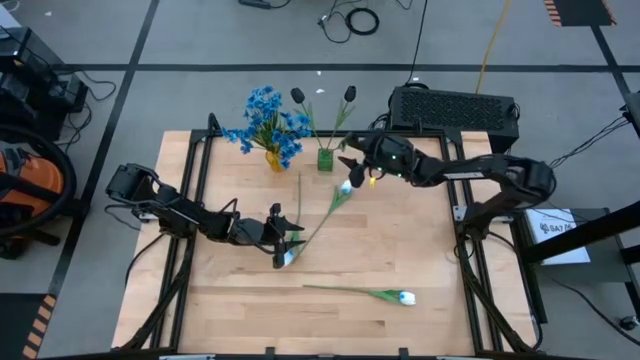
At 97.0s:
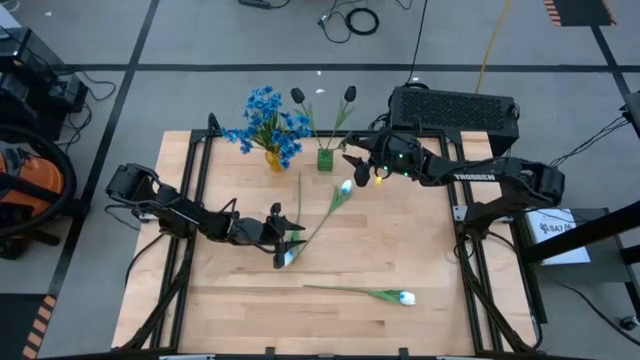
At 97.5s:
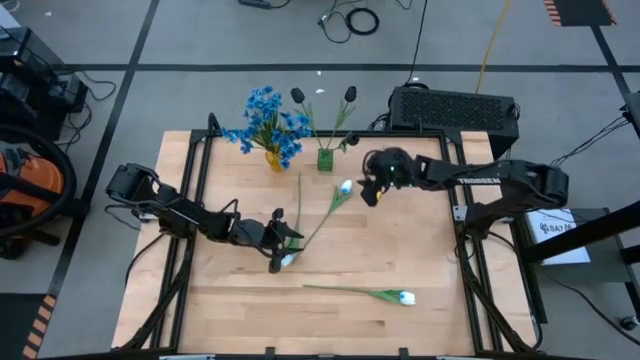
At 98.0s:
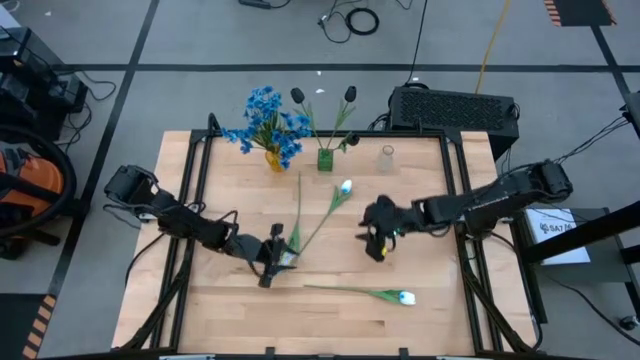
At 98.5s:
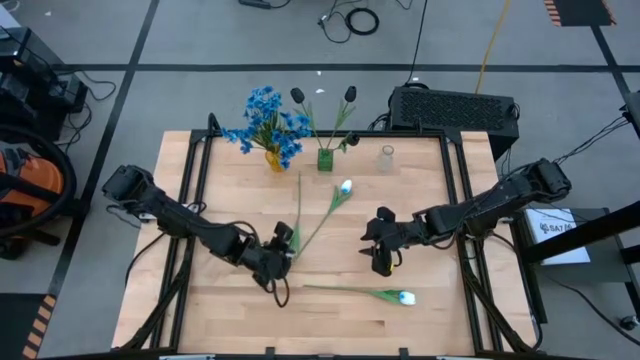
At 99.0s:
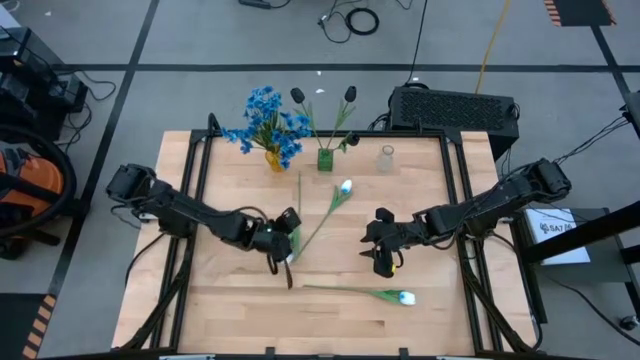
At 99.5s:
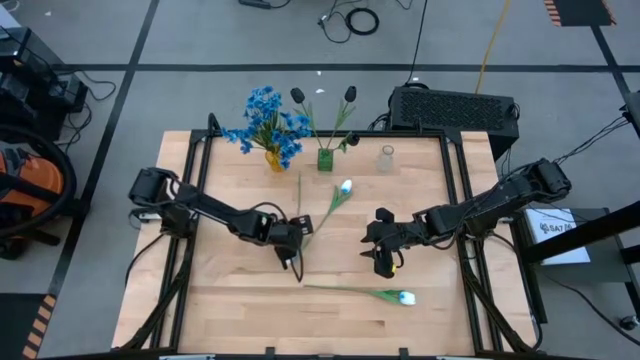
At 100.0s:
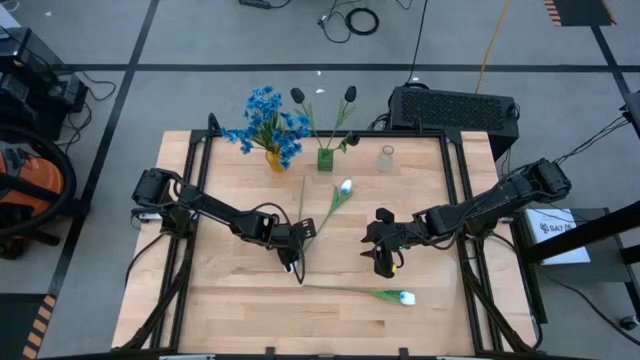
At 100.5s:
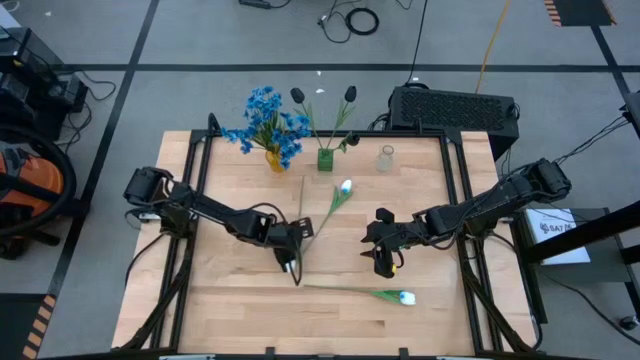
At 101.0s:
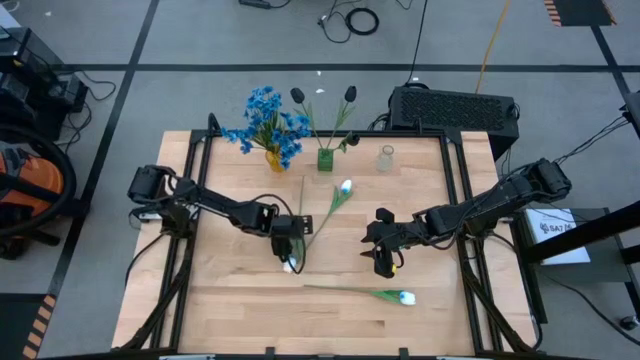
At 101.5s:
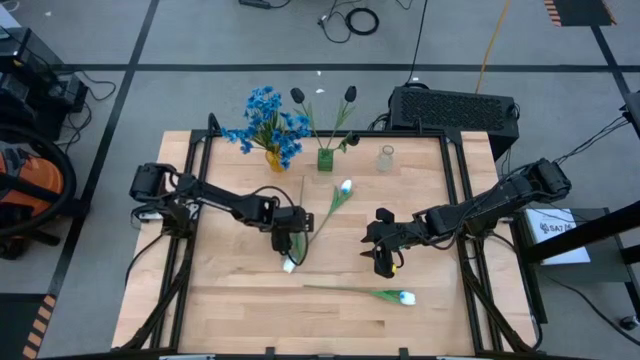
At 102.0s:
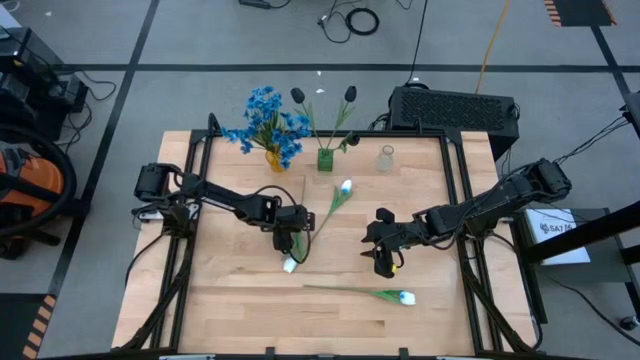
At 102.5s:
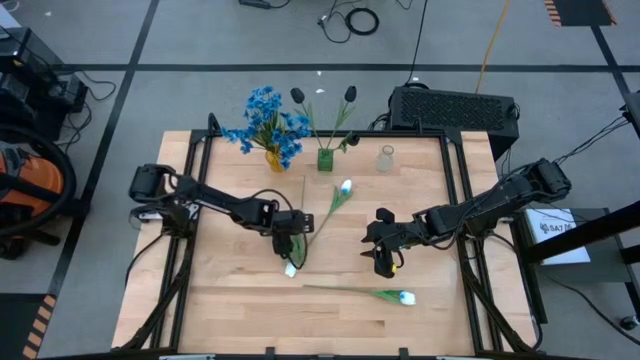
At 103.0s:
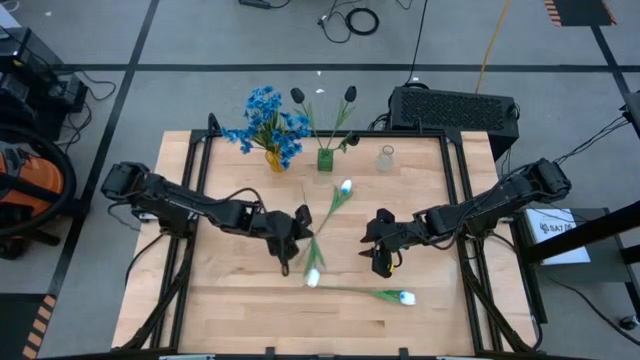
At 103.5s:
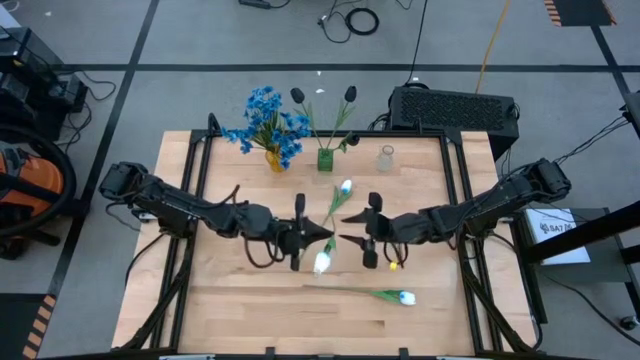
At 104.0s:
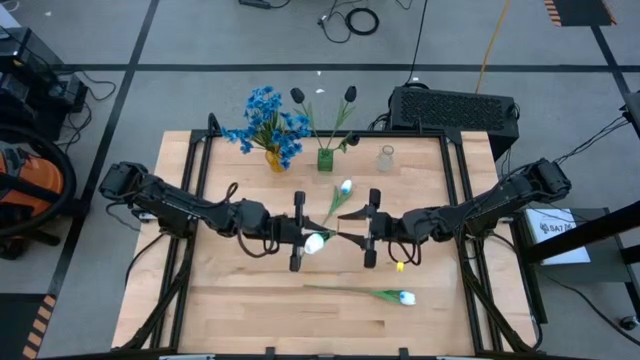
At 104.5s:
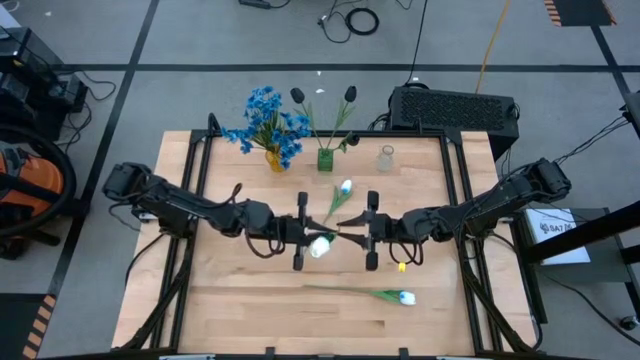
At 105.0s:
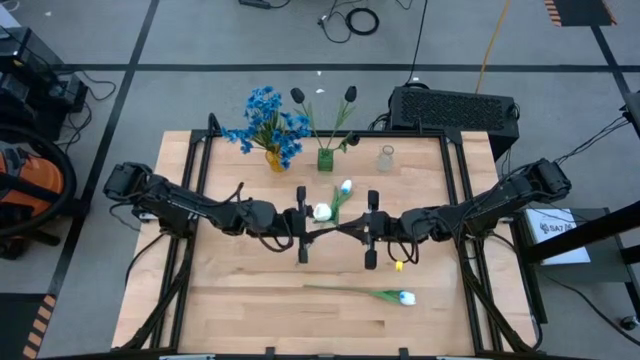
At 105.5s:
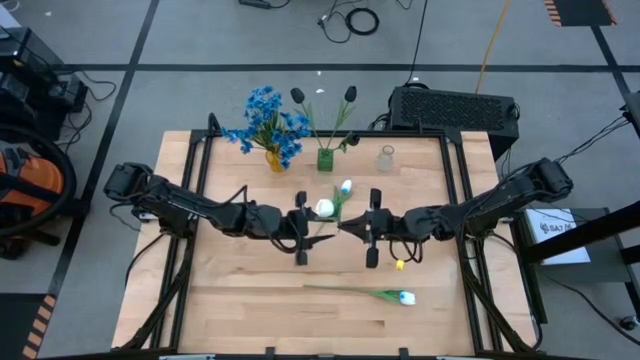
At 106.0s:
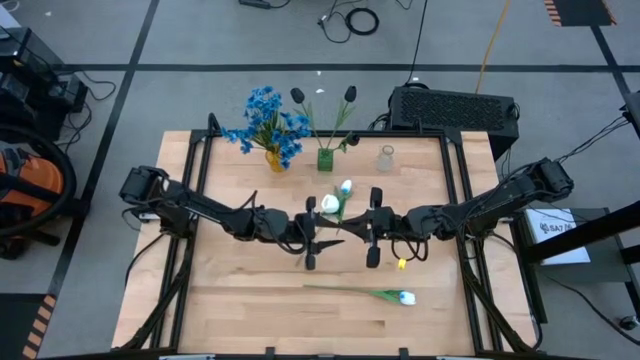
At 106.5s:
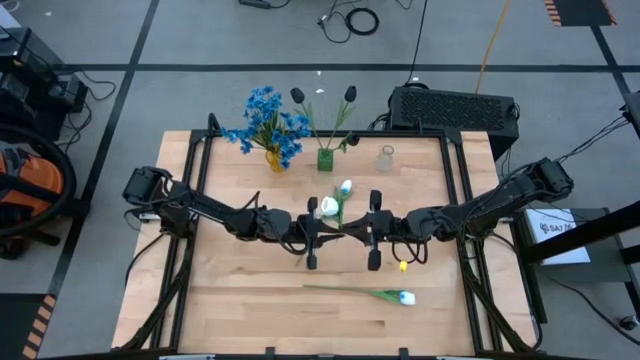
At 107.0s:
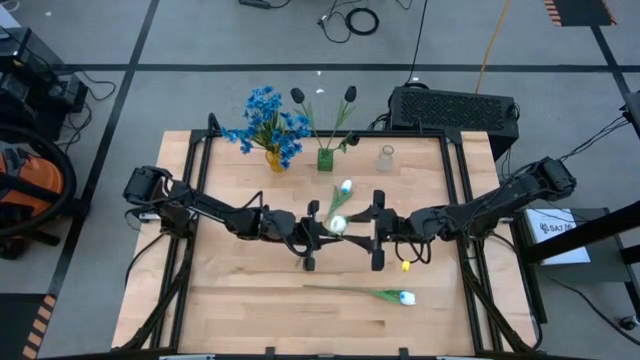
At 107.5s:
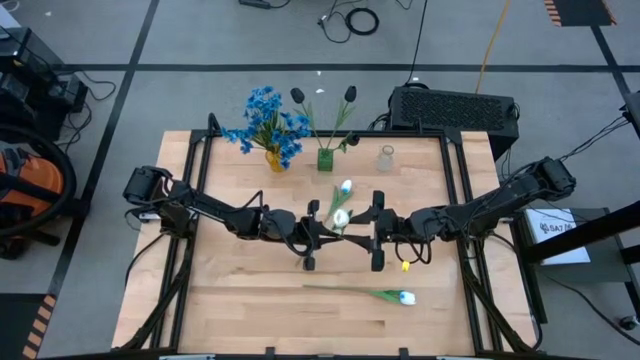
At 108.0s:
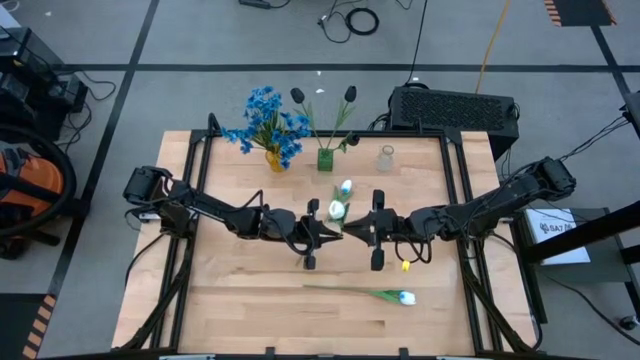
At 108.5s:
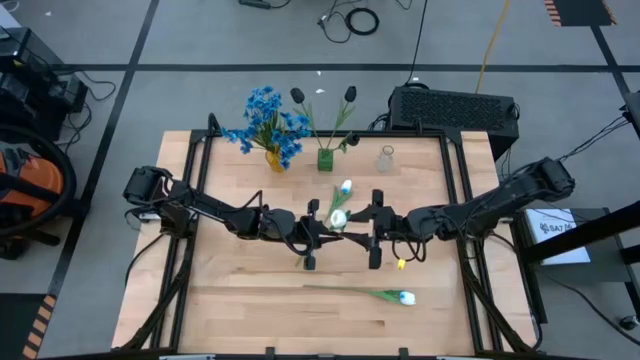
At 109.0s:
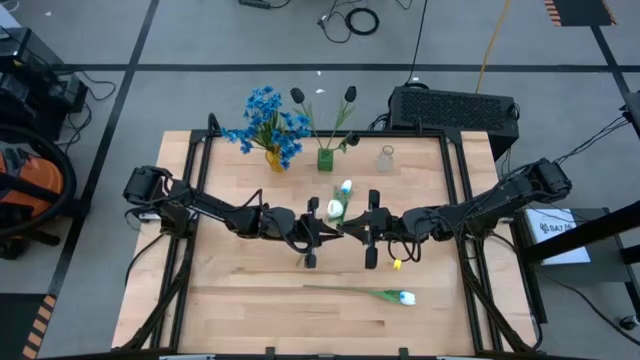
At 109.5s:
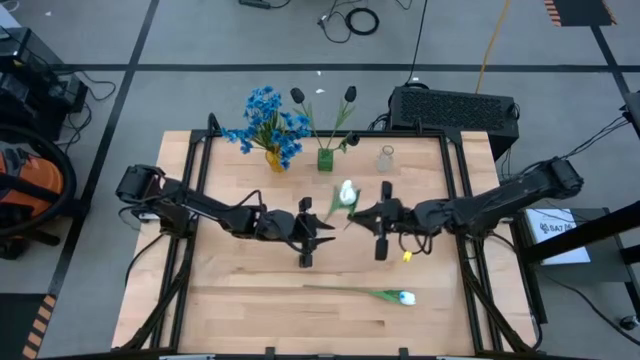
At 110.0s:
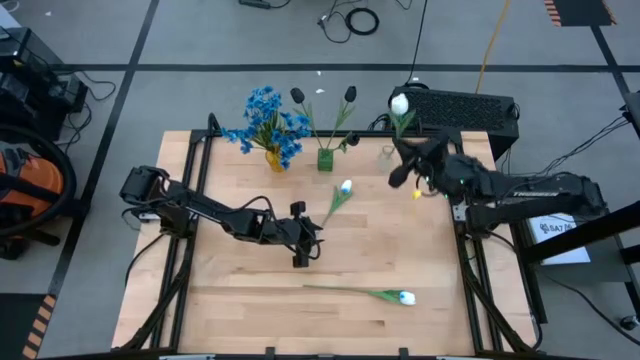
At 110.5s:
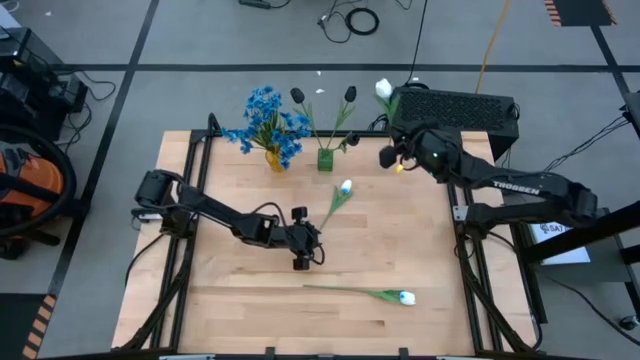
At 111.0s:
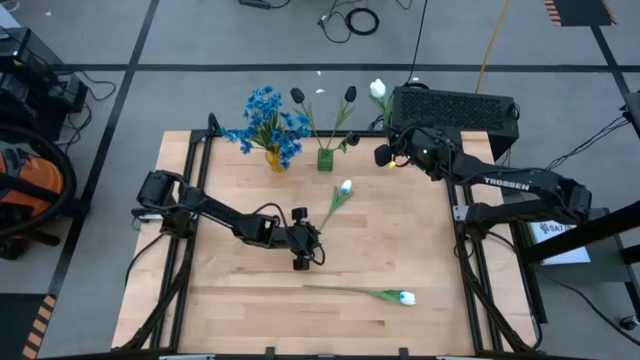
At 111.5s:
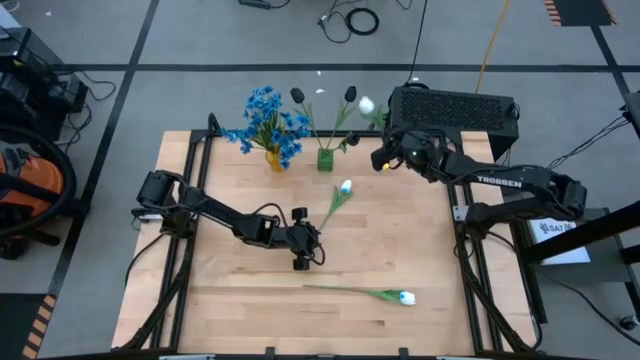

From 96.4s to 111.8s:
Task: Sort flowers into vase by color
Put the top left white tulip into the transparent vase

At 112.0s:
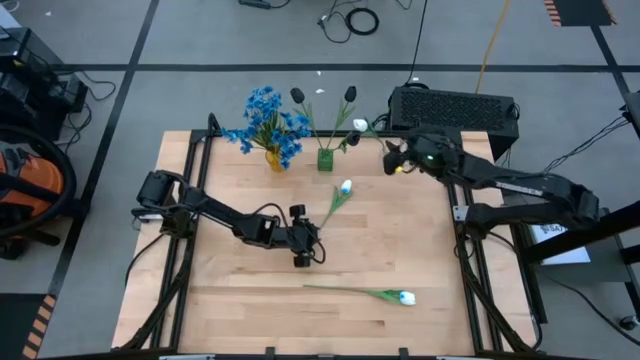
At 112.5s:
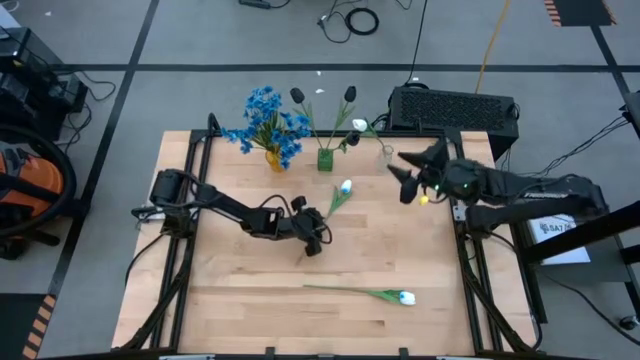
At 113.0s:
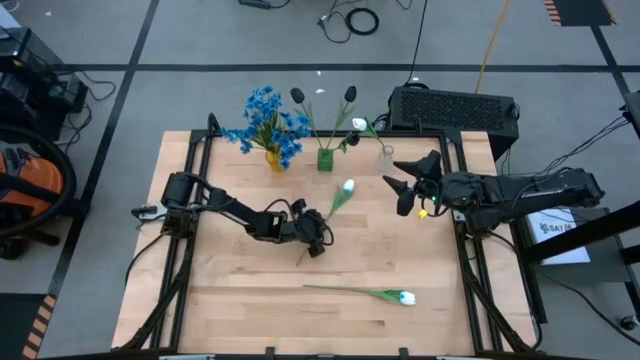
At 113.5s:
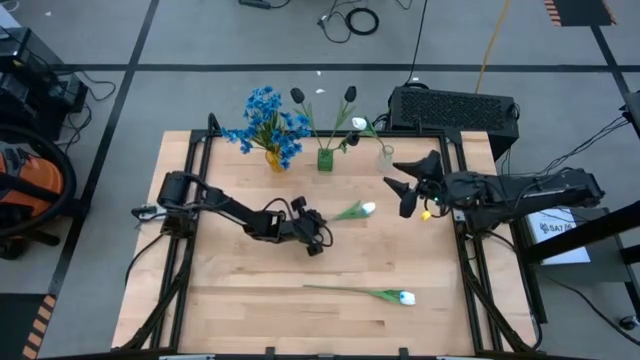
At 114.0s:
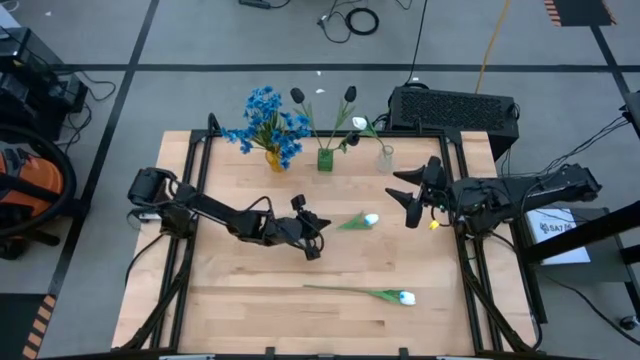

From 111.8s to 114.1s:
Put the top white tulip into the transparent vase

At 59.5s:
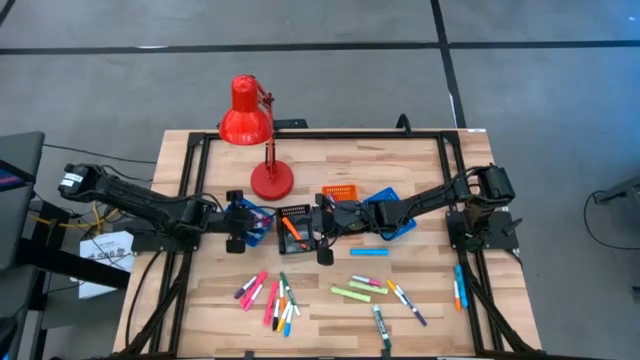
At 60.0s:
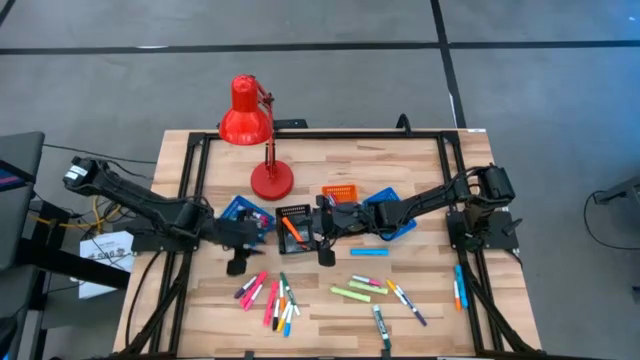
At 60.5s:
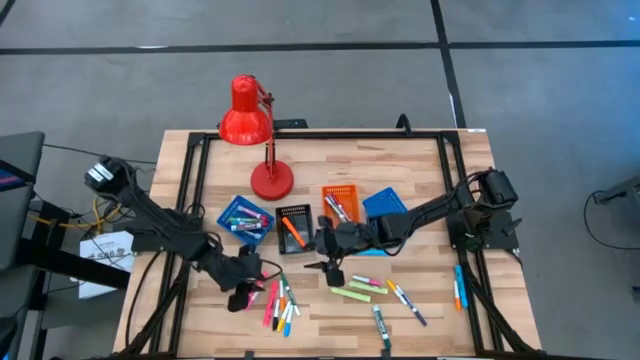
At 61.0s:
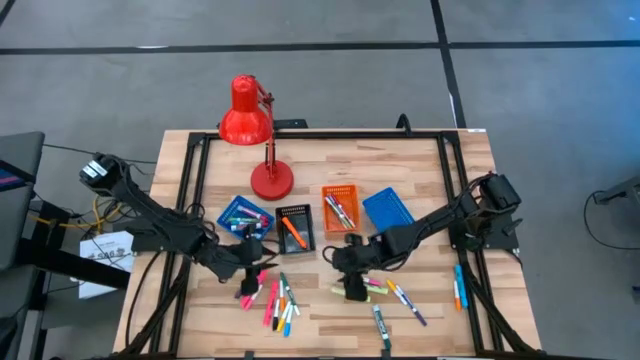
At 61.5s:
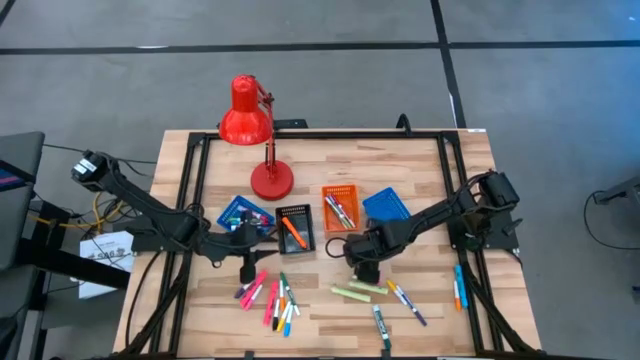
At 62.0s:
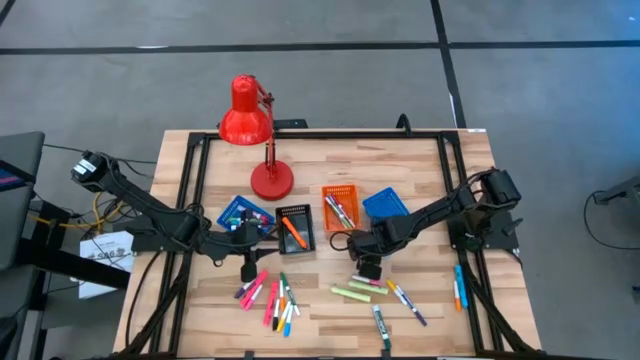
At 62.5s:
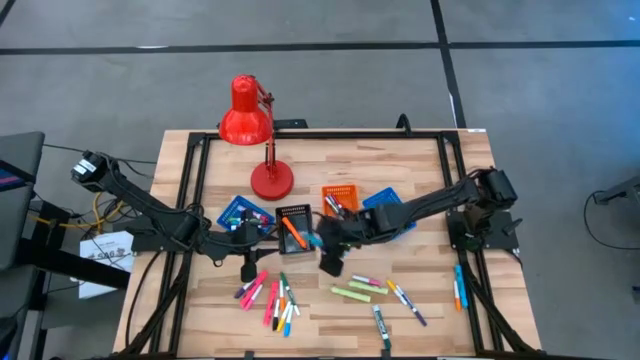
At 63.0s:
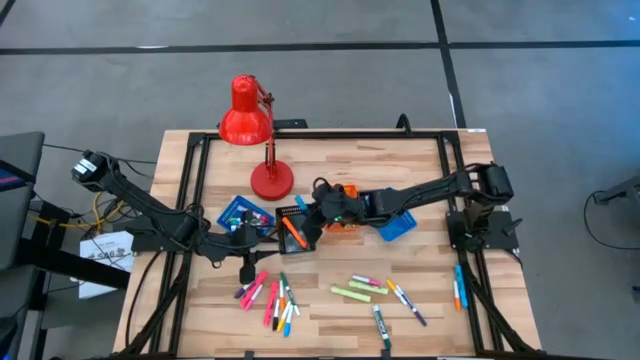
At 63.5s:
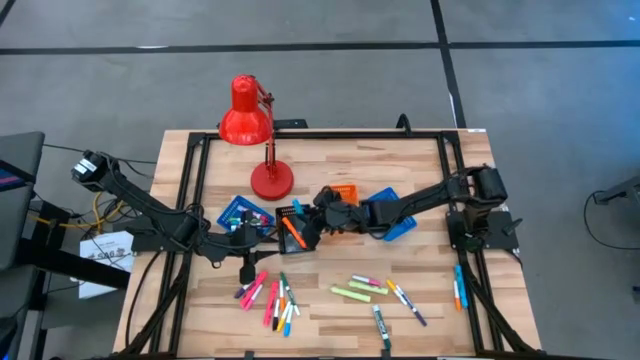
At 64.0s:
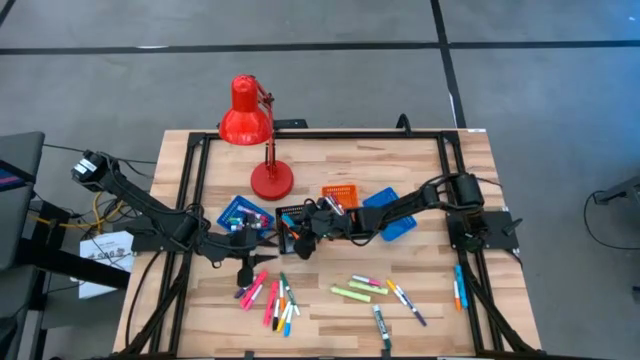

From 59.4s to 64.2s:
Task: Pick & Place Markers
Put the left large blue highlighter pen into the black basket
